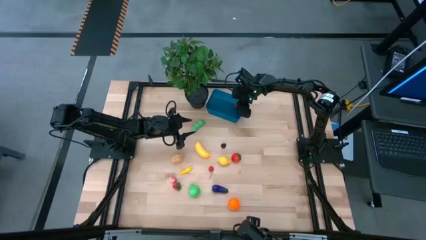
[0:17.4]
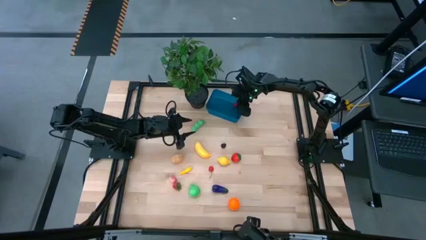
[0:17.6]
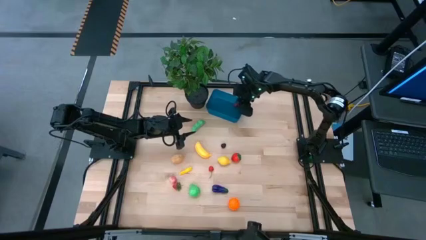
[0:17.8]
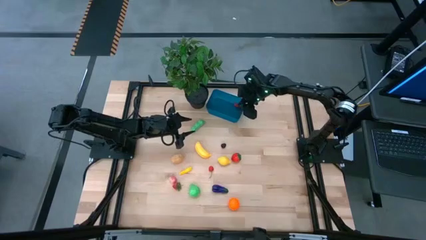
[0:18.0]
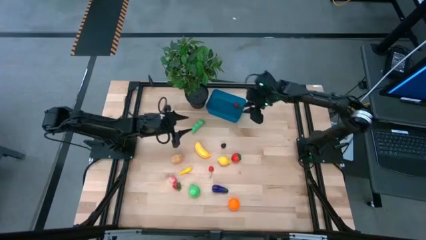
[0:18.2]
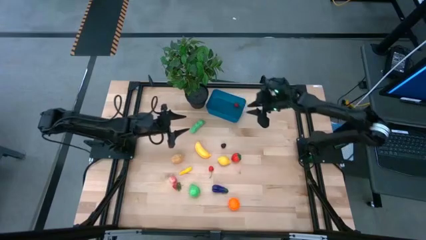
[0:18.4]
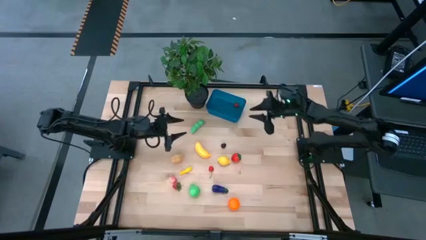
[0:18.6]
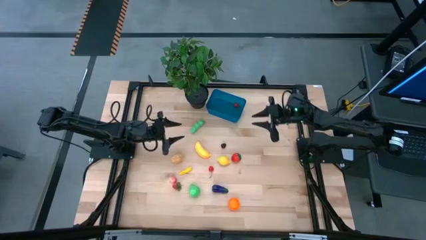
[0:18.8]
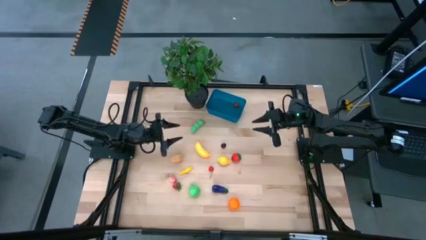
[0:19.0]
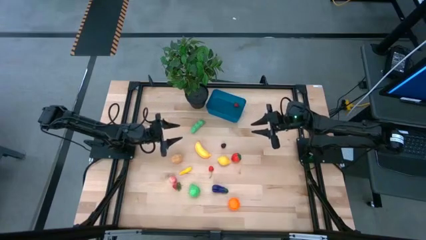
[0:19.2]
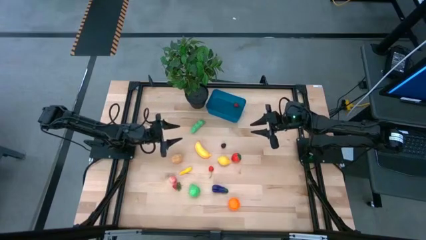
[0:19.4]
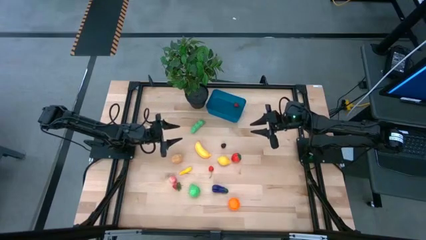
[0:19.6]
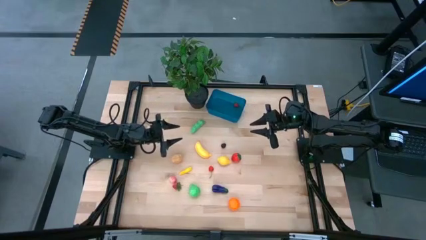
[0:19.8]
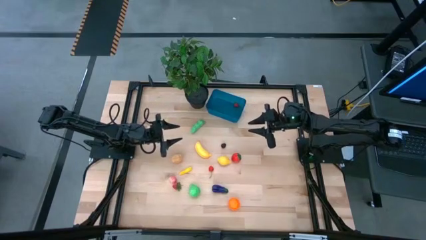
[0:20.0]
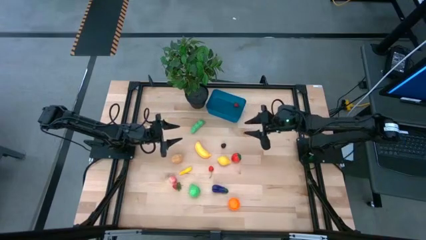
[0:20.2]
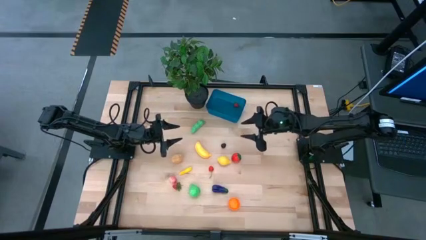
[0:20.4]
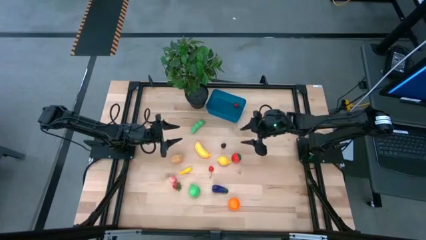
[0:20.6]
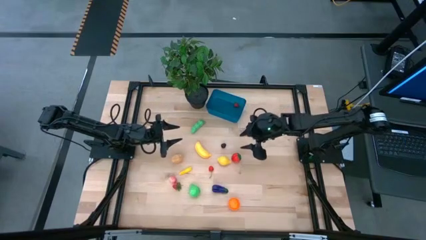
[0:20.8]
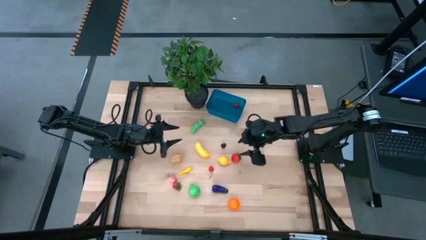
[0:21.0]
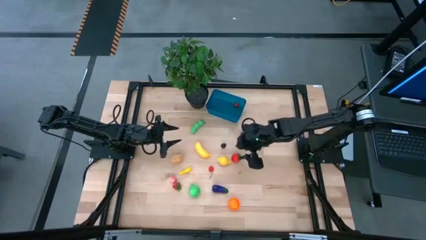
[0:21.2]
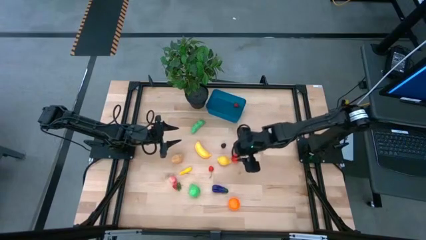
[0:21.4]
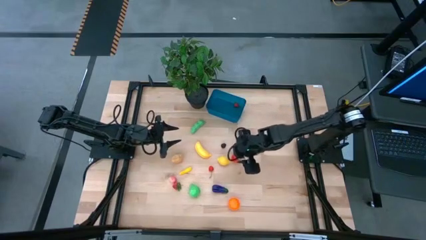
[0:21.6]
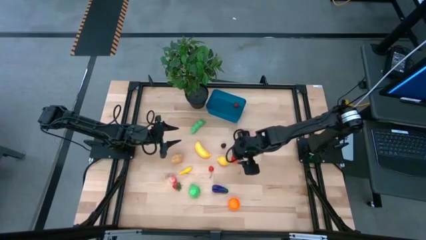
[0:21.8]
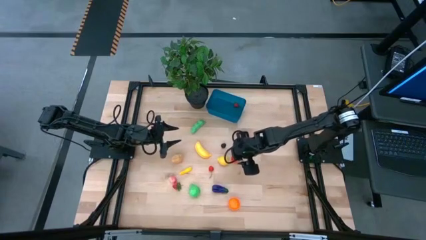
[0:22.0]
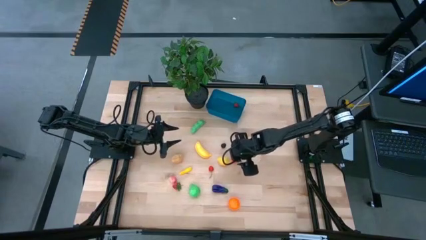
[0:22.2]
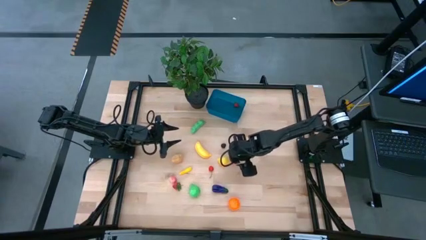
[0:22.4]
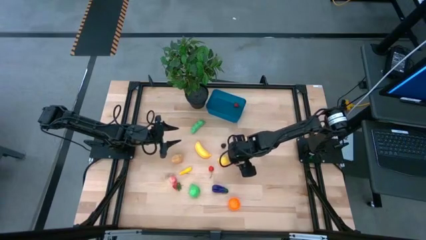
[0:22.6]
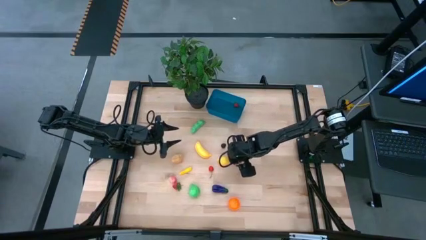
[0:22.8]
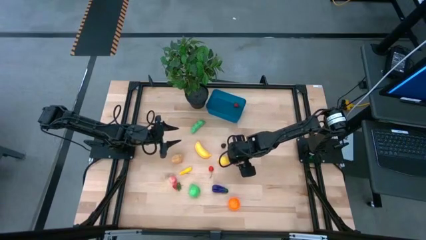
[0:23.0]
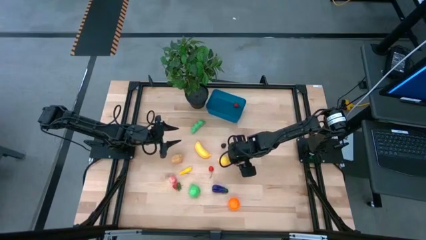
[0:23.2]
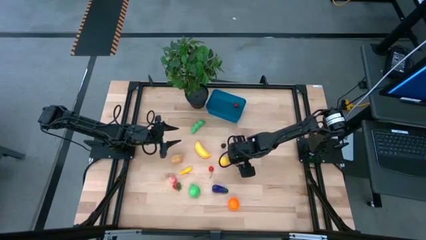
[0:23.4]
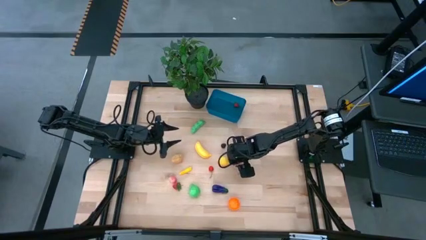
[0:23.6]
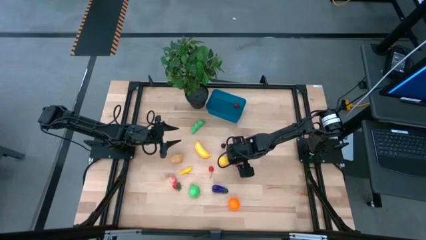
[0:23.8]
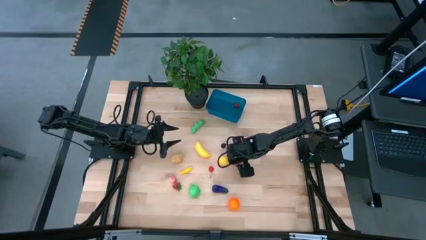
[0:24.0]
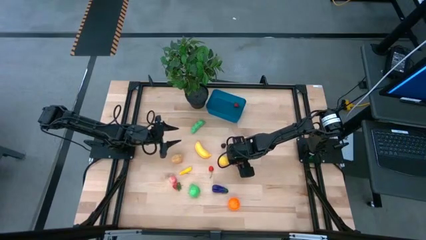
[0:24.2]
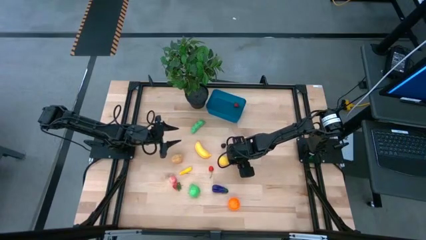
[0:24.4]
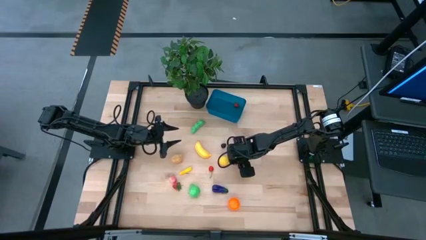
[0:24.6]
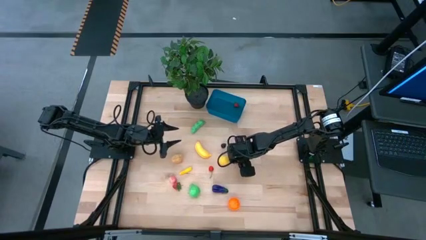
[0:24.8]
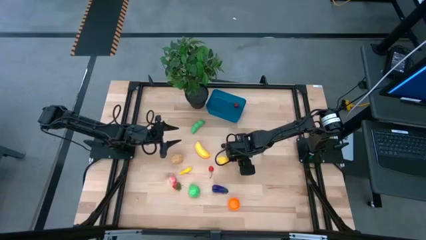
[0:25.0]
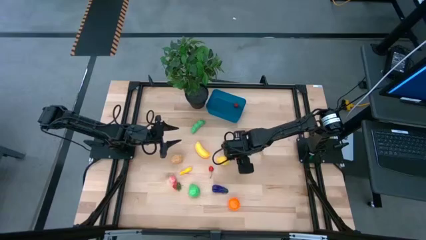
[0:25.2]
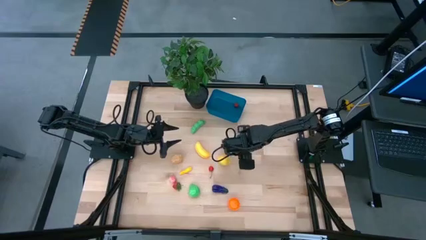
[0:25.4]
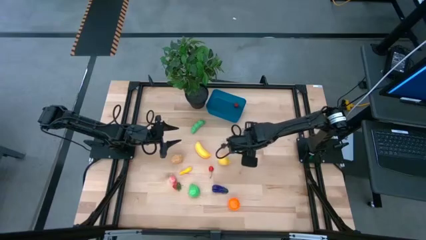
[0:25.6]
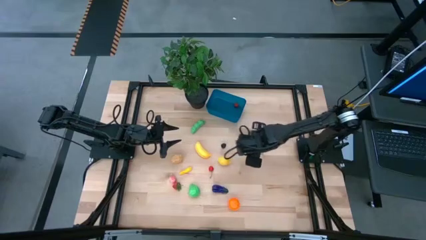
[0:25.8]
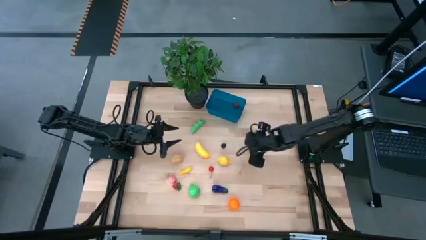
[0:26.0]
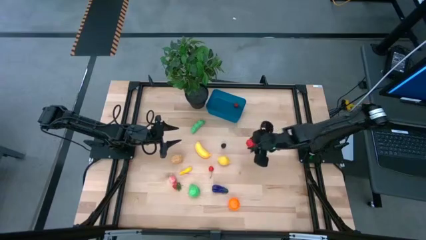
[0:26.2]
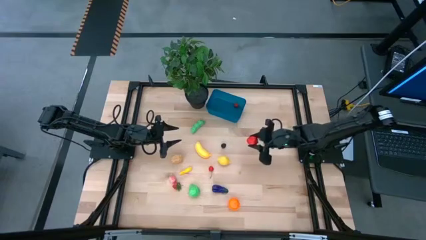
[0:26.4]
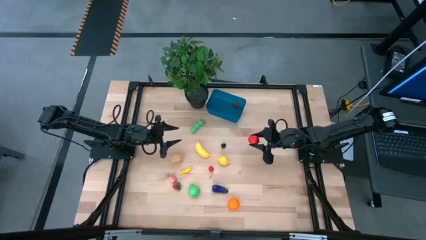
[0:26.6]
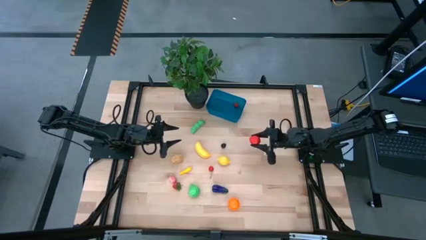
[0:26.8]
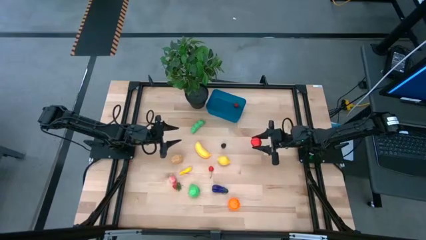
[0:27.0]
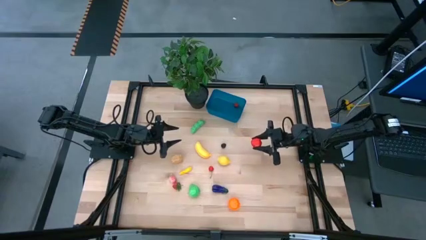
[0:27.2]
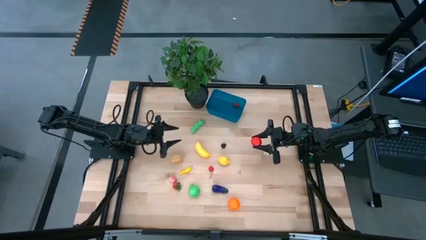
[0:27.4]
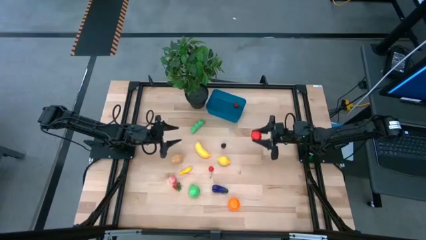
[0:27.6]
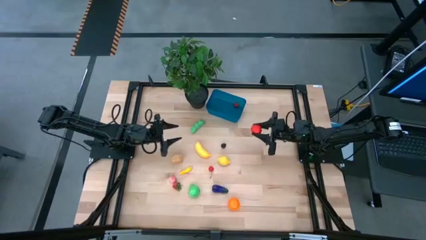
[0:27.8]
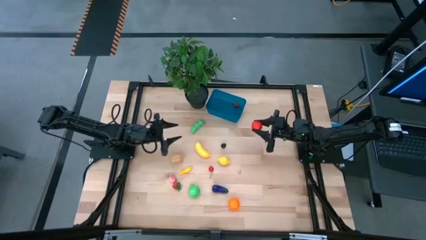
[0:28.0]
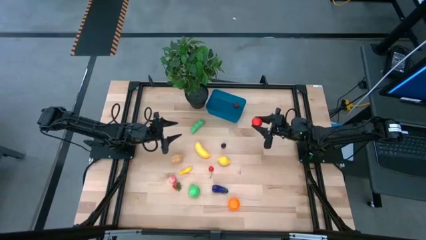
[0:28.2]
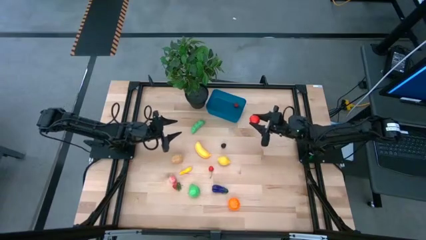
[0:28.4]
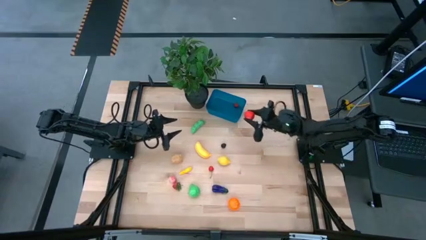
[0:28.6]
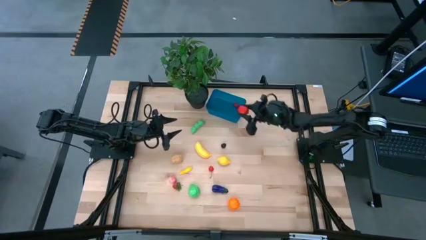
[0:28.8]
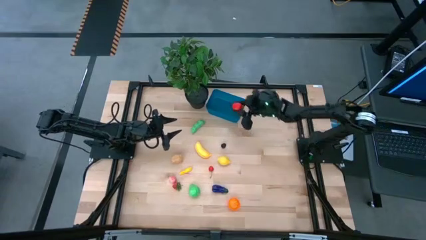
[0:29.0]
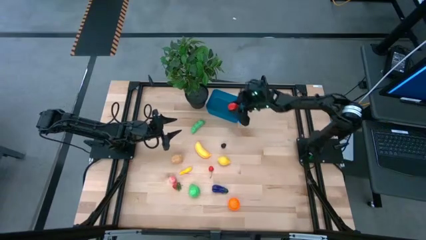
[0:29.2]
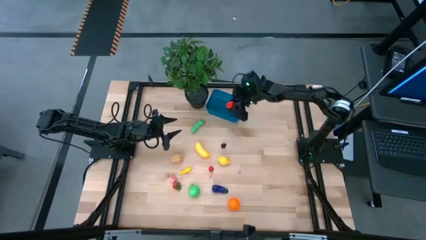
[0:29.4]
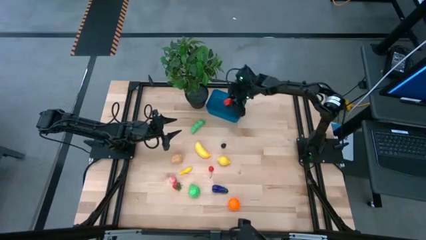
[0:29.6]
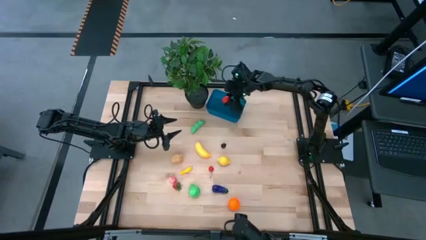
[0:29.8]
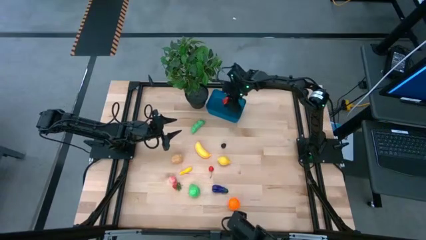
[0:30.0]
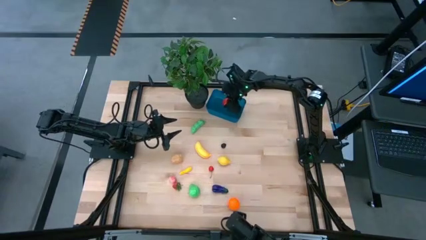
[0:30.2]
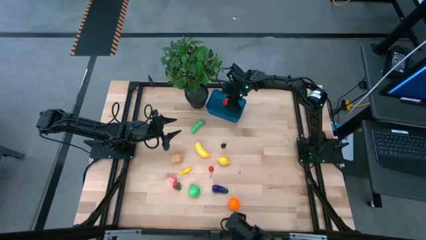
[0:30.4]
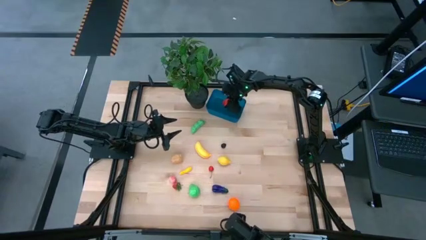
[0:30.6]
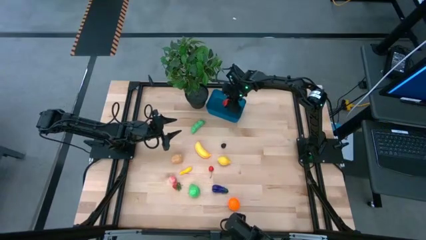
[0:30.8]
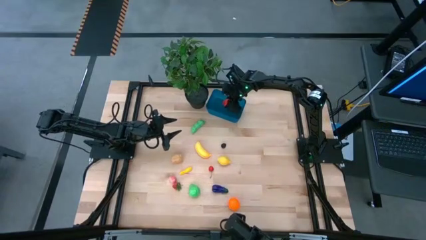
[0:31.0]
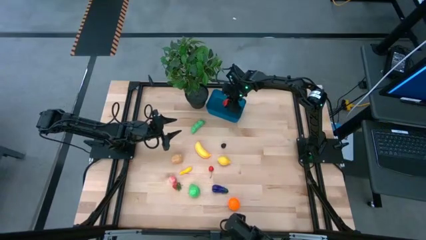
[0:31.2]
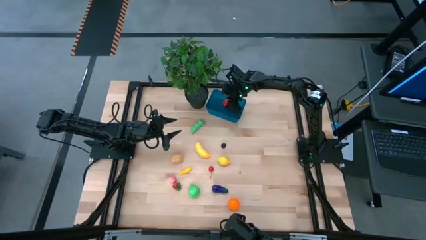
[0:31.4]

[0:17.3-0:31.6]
Task: Pick and placing Produce into tupperware
Put the red strawberry into the blue container
